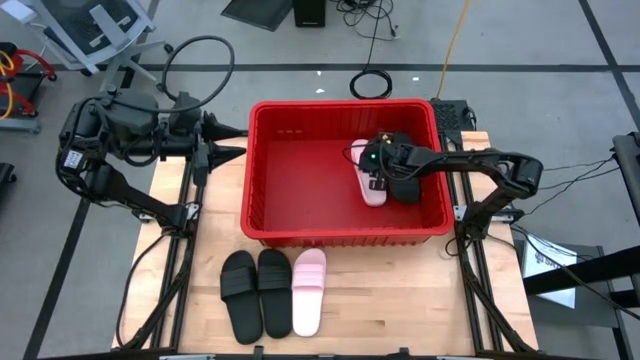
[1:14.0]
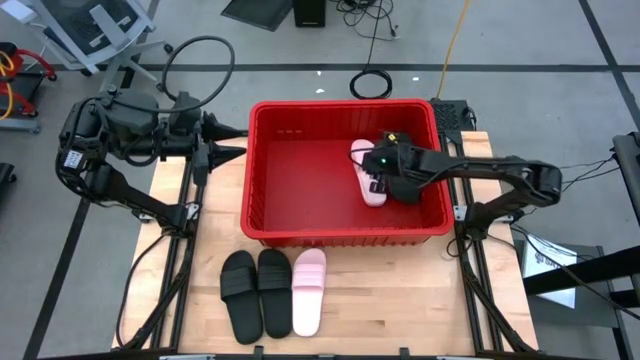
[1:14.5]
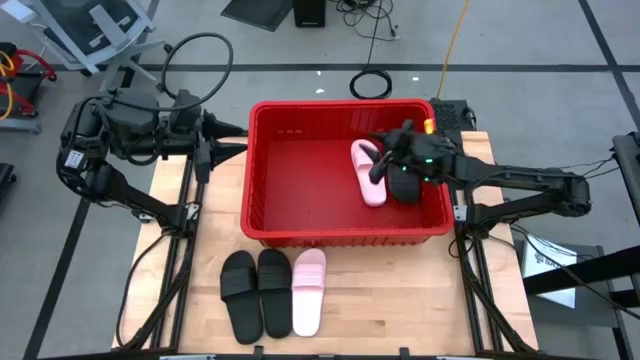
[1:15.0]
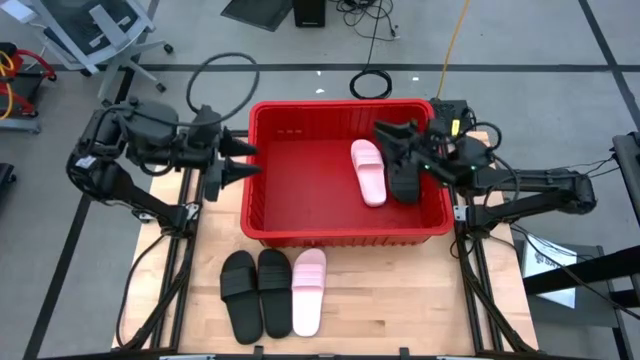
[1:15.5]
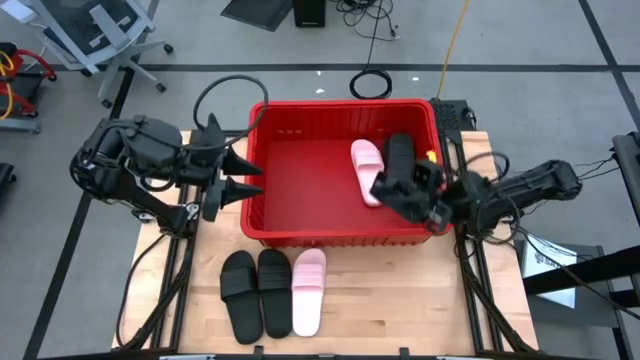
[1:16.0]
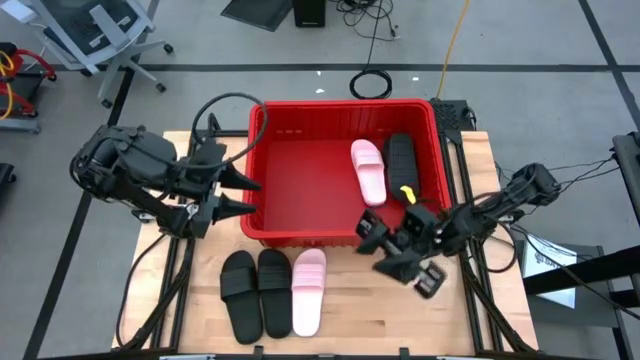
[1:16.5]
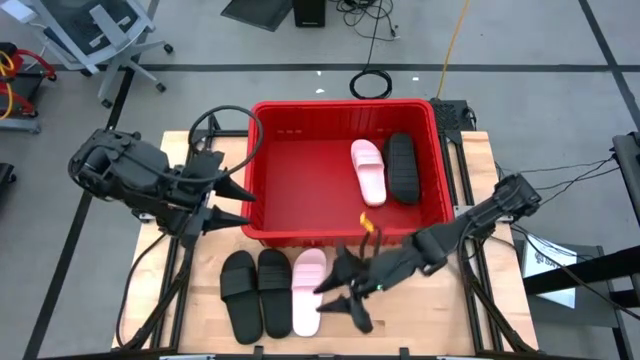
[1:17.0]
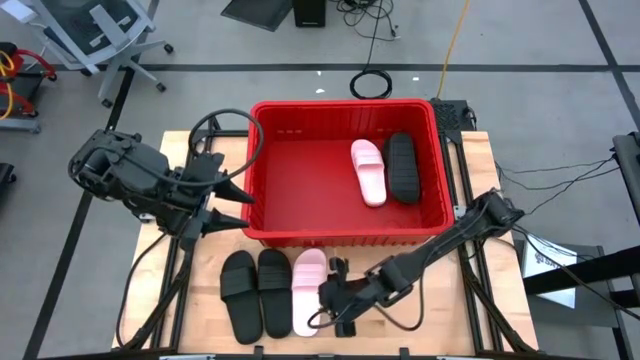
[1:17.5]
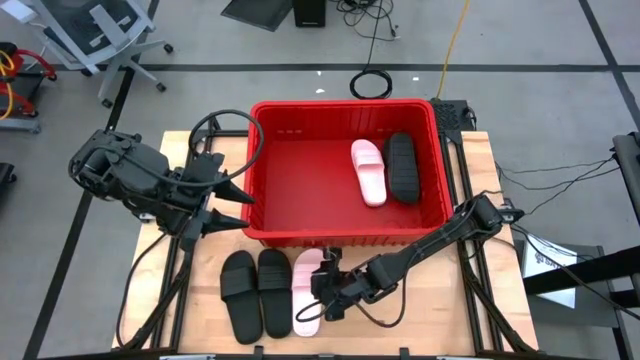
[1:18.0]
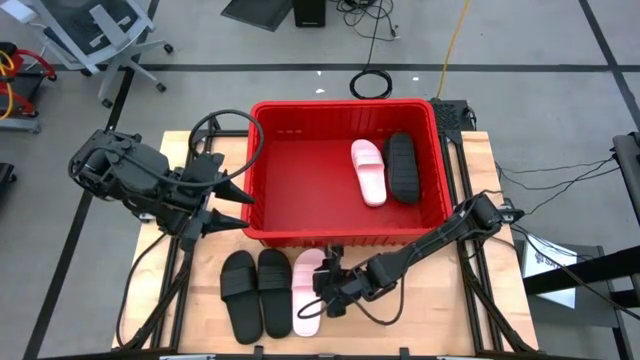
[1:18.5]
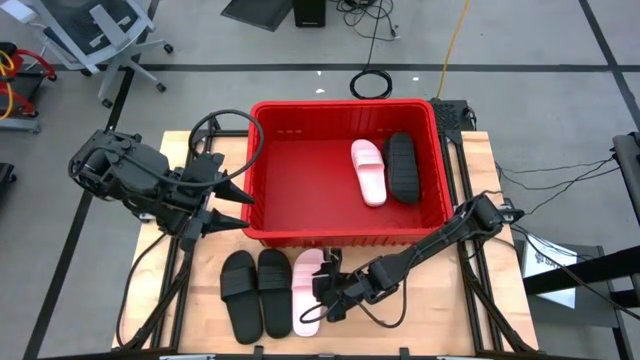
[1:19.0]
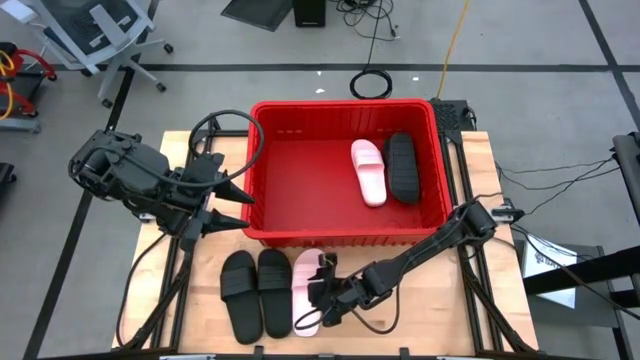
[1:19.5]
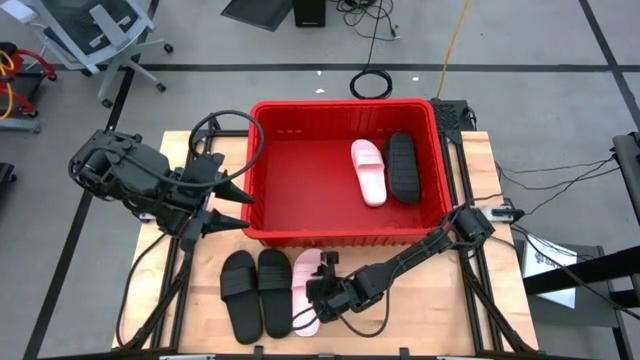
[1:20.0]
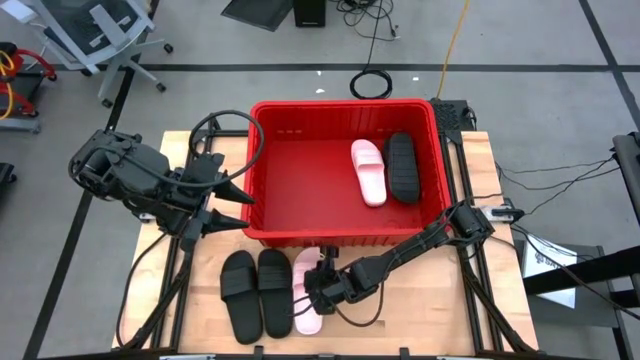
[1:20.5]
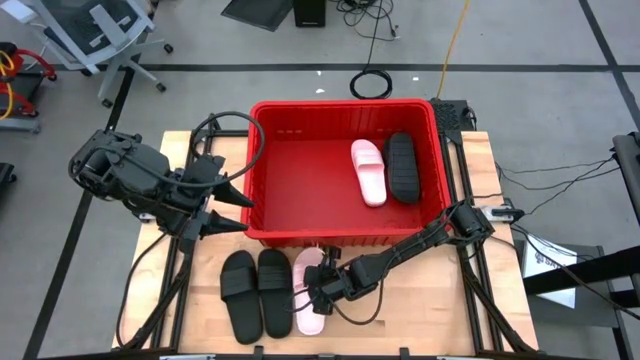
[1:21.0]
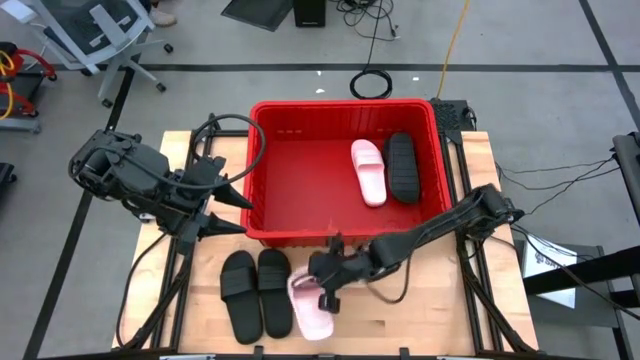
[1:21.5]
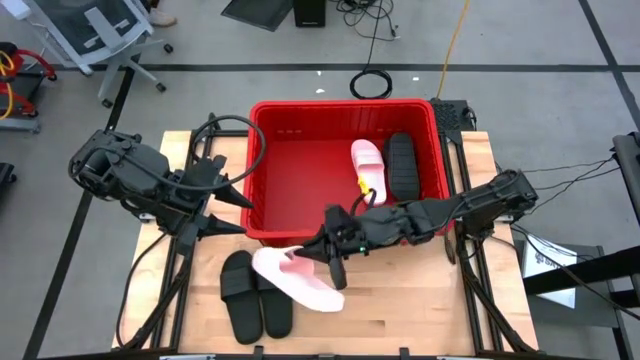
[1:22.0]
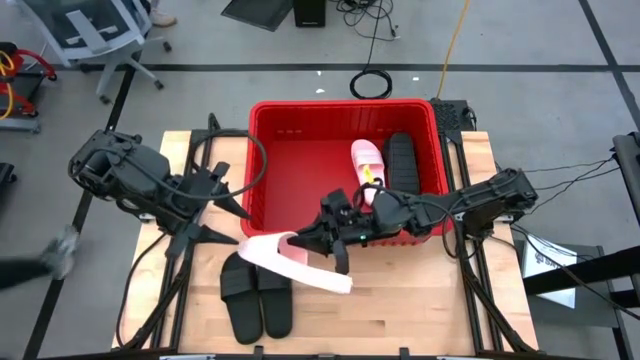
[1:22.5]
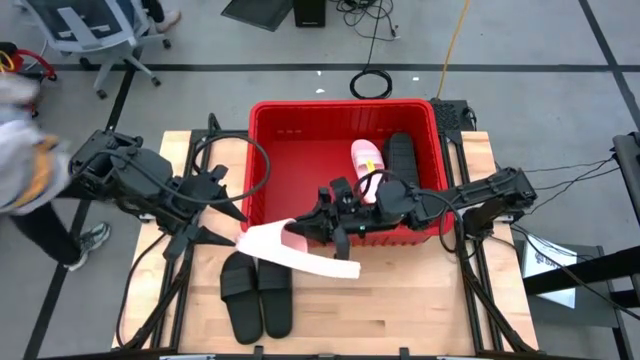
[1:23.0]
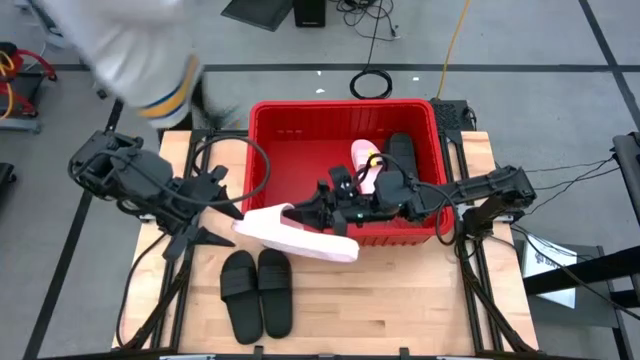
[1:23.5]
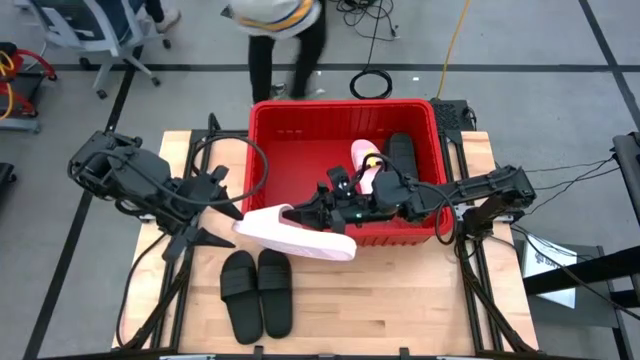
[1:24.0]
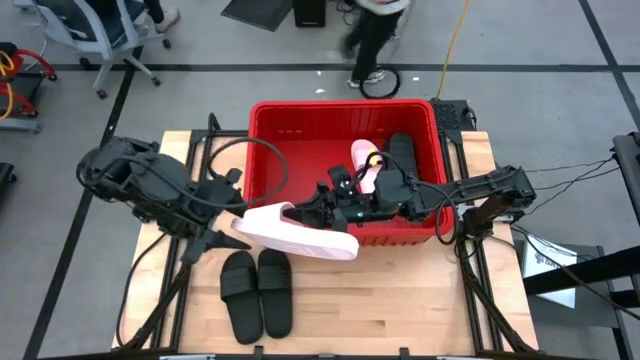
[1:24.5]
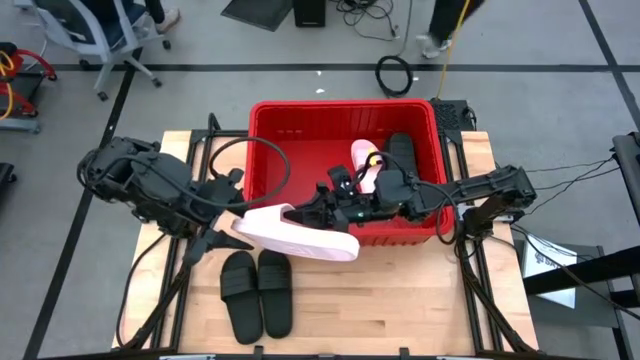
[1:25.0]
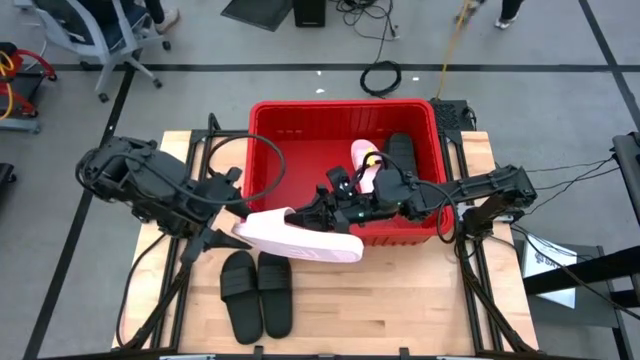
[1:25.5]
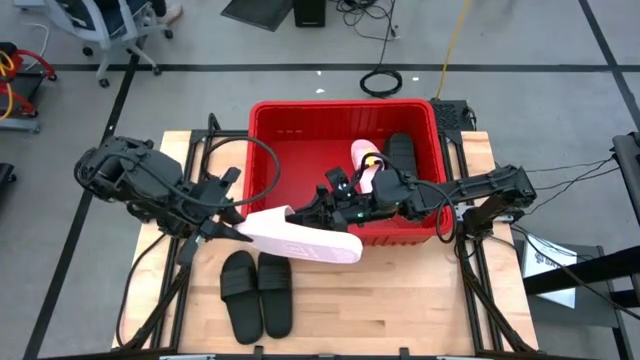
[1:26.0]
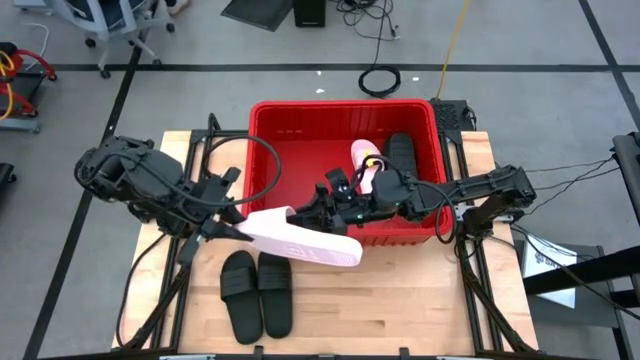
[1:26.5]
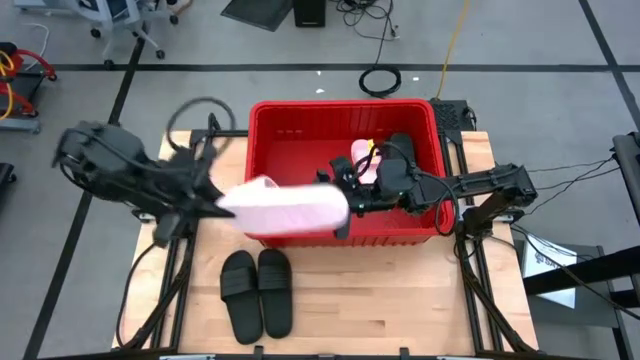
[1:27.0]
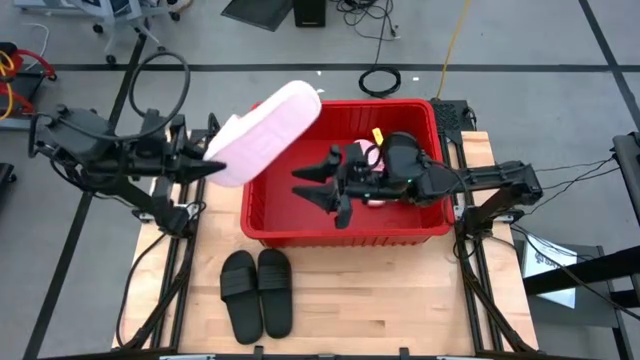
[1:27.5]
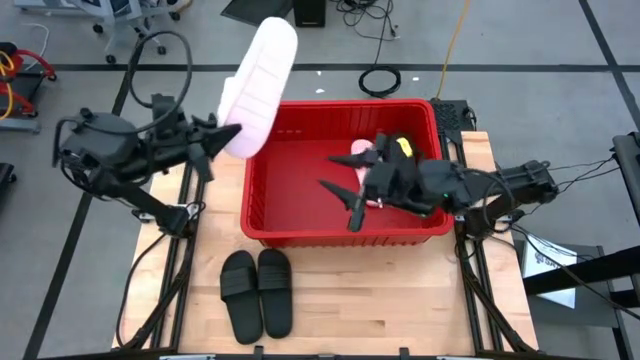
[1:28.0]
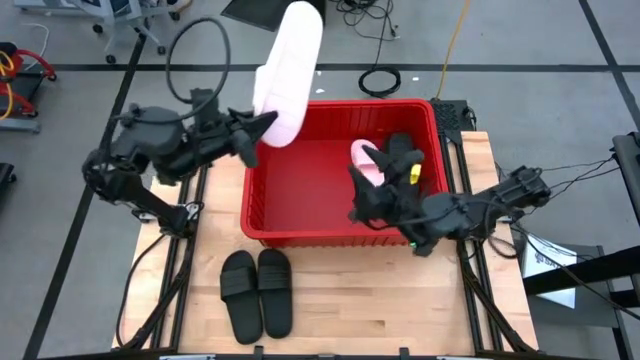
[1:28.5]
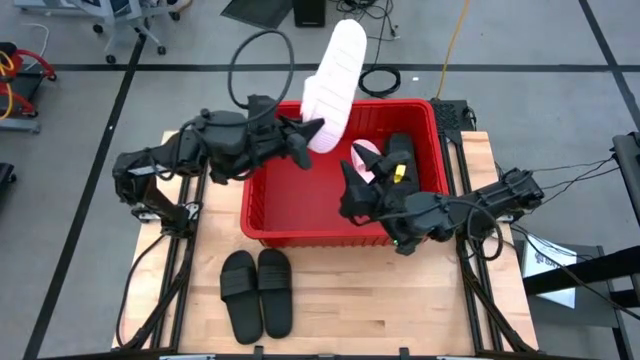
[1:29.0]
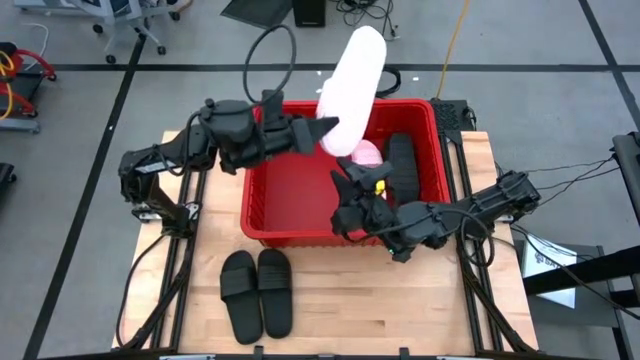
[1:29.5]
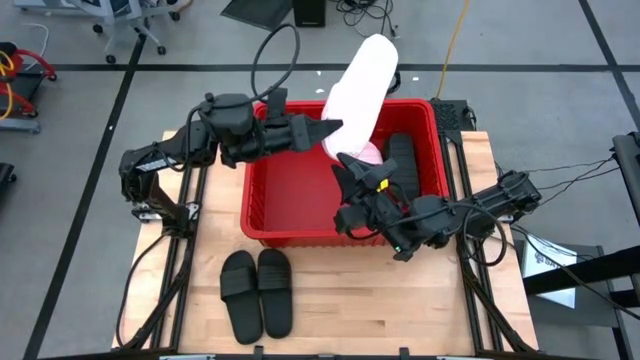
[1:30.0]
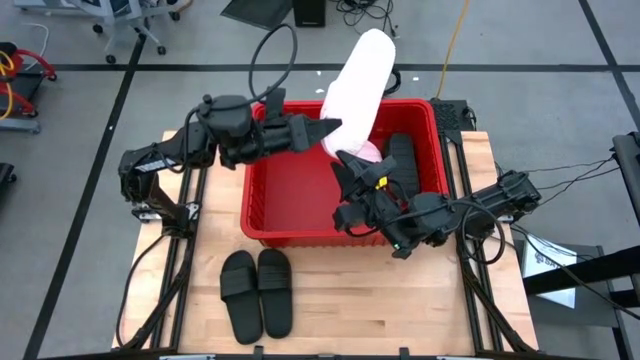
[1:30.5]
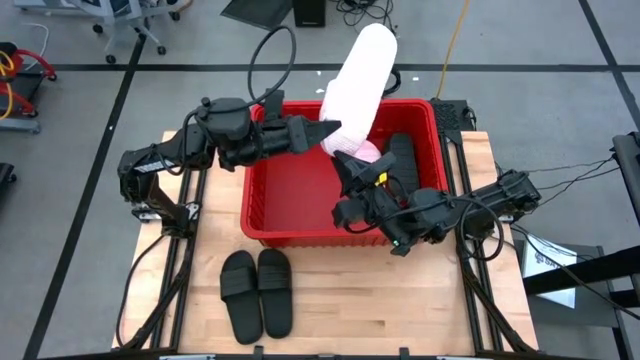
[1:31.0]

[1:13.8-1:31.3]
Task: Pick and place slides into bin
Put the pink slide into the red container

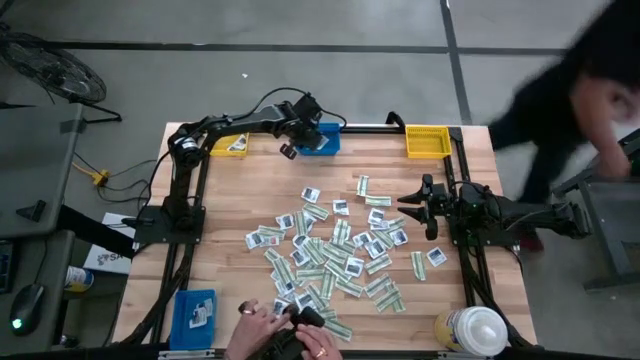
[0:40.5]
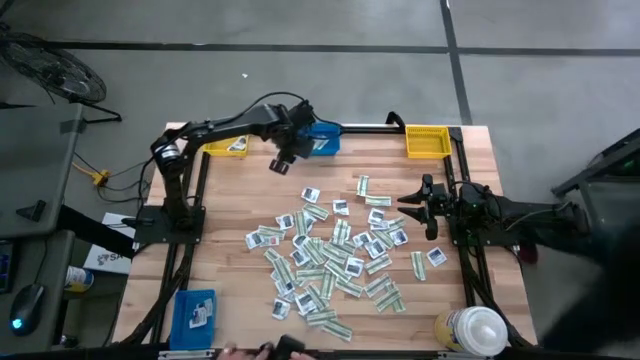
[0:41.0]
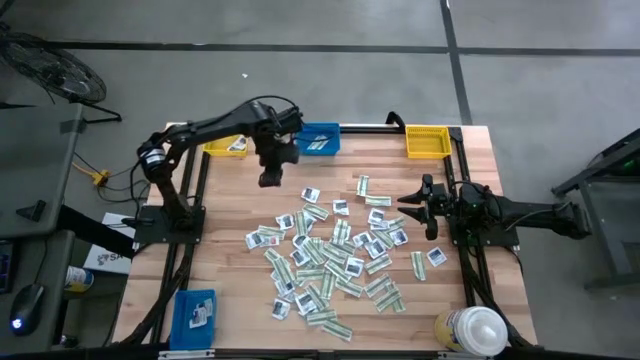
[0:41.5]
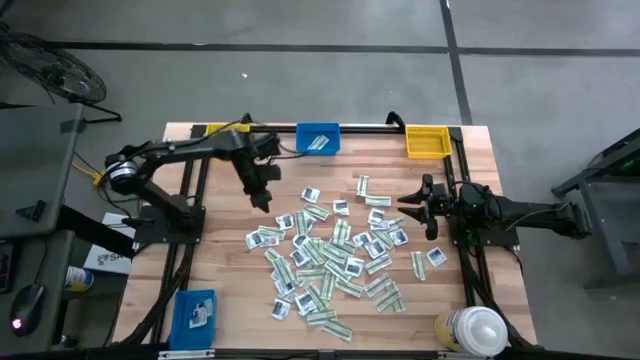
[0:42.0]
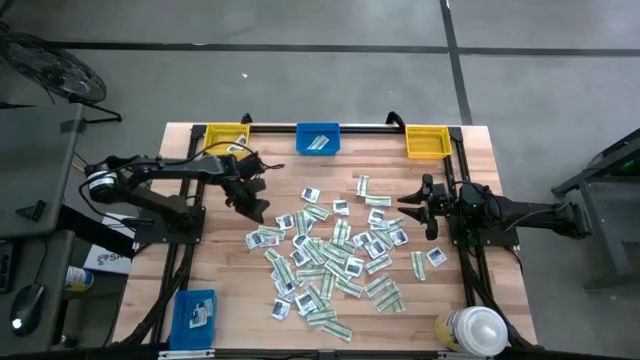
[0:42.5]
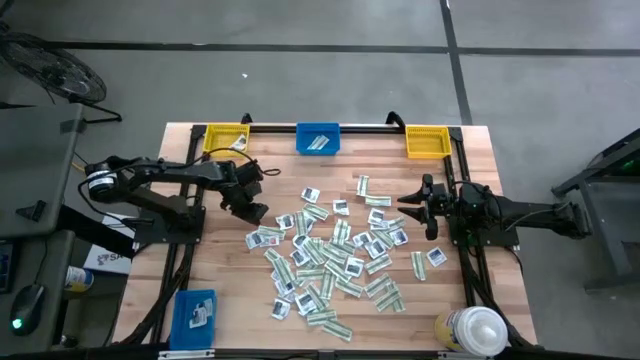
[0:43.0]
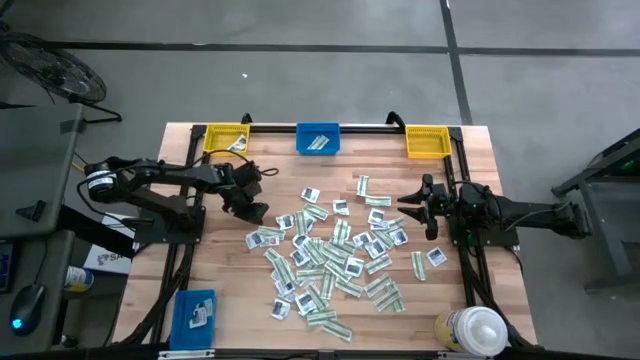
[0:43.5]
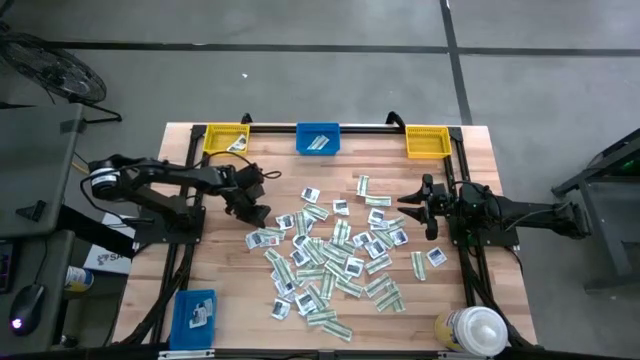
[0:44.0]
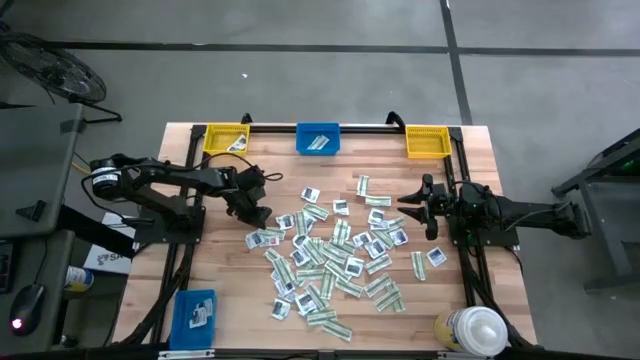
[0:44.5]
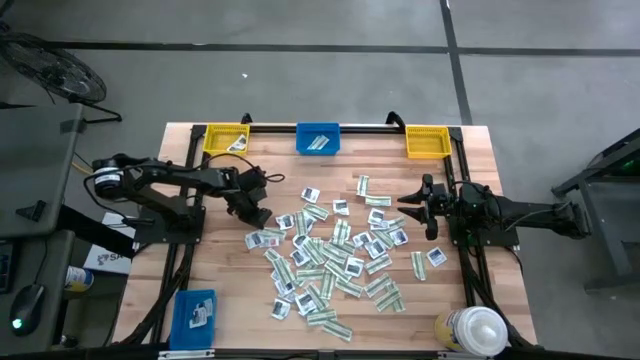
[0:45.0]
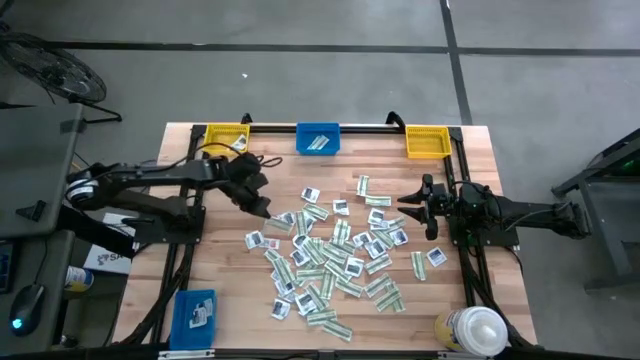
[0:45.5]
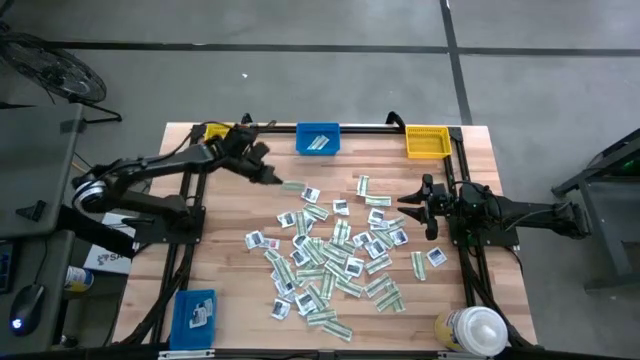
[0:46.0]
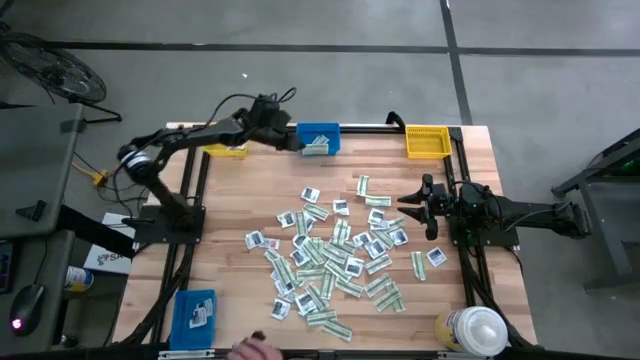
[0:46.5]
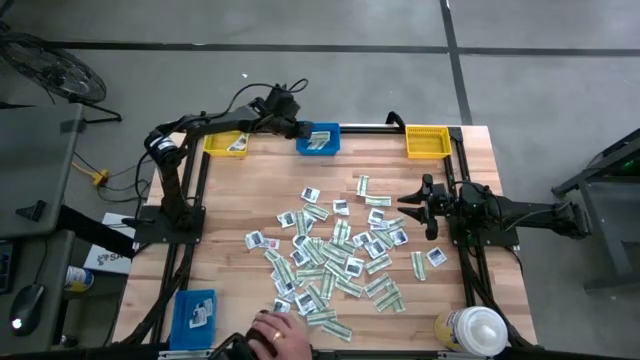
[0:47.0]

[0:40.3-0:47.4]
Task: Pick & Place First Aid Supplies
Put the green bandage pack into the top blue bin
